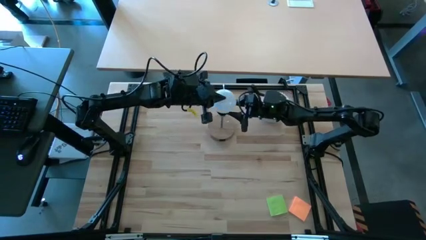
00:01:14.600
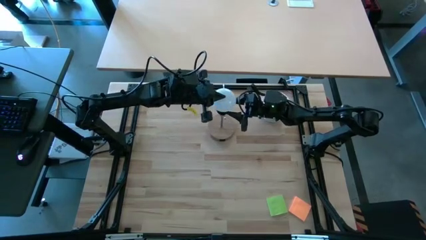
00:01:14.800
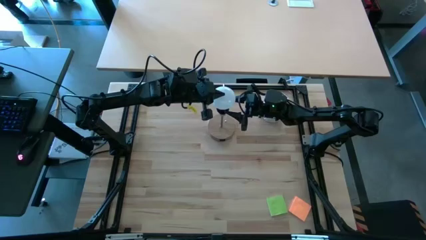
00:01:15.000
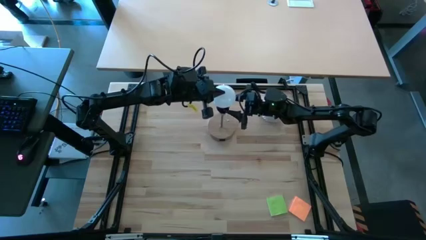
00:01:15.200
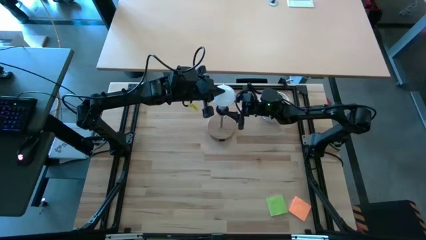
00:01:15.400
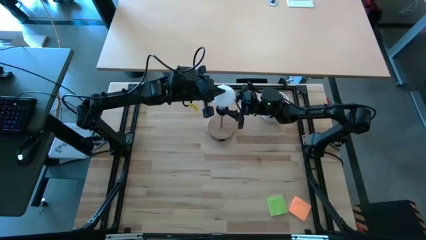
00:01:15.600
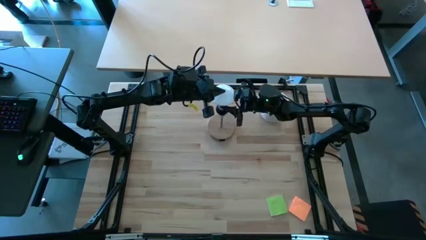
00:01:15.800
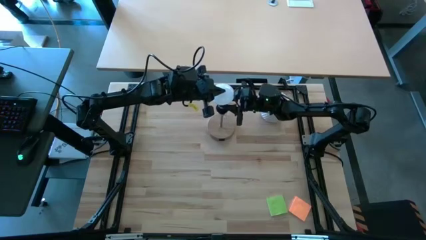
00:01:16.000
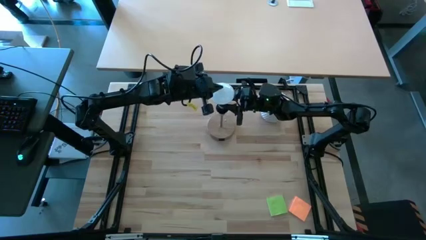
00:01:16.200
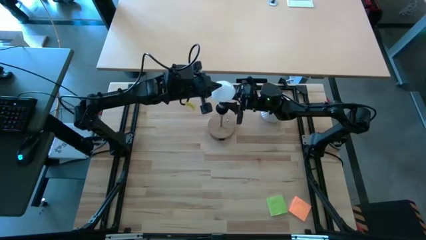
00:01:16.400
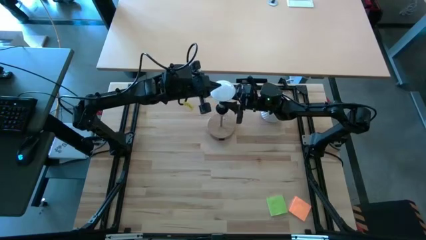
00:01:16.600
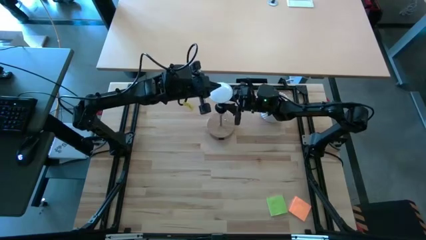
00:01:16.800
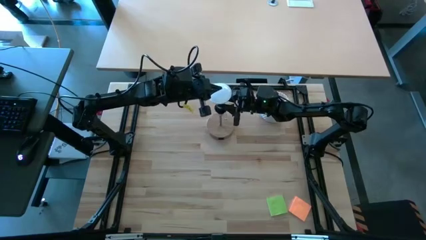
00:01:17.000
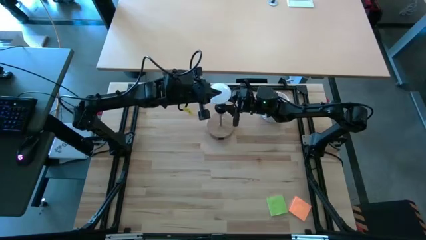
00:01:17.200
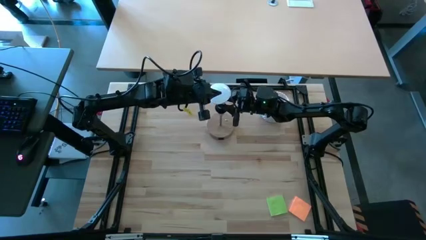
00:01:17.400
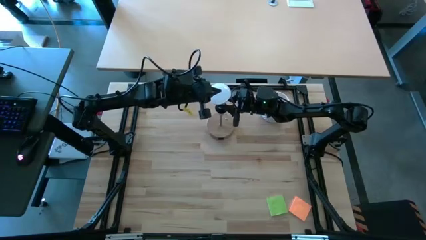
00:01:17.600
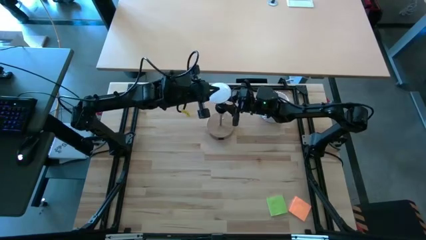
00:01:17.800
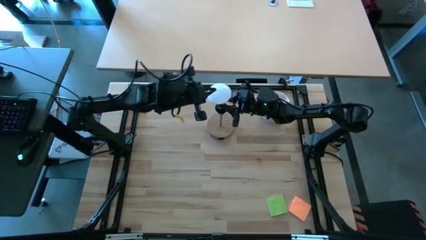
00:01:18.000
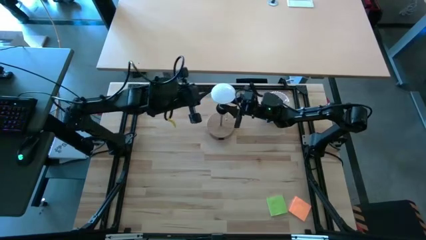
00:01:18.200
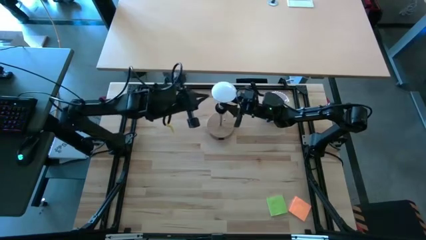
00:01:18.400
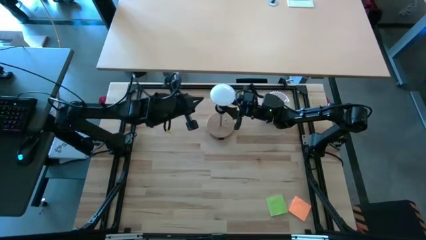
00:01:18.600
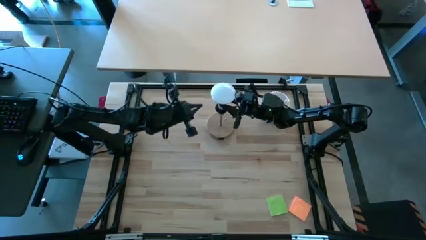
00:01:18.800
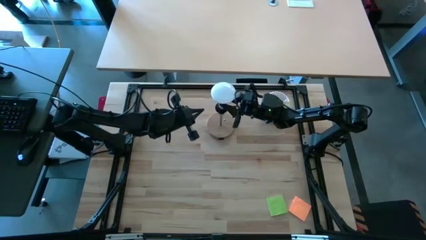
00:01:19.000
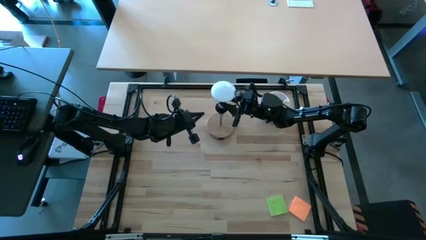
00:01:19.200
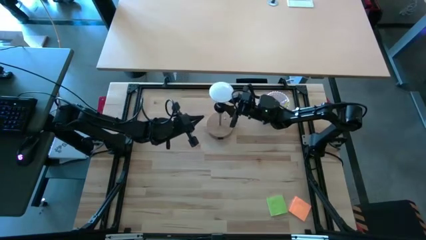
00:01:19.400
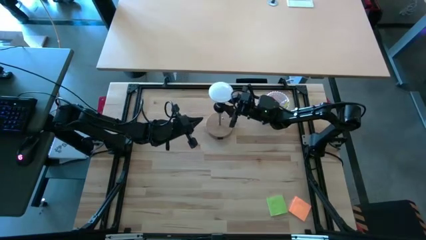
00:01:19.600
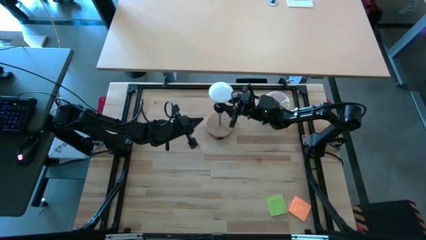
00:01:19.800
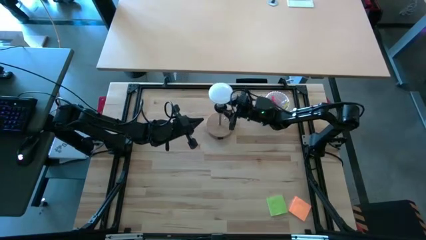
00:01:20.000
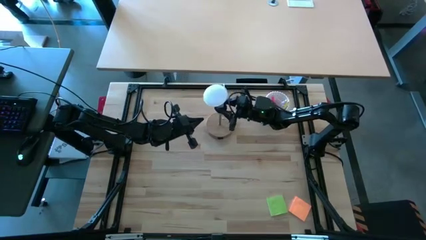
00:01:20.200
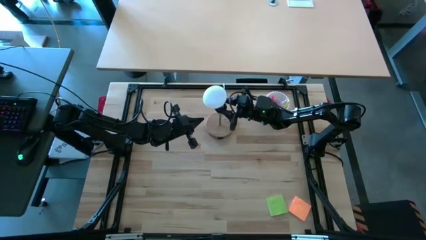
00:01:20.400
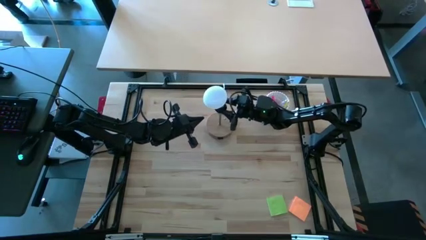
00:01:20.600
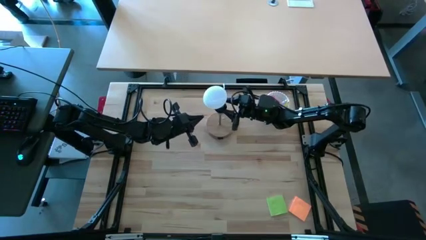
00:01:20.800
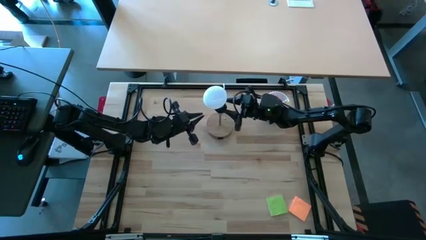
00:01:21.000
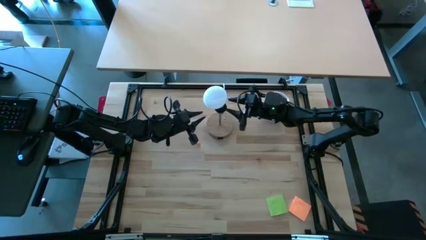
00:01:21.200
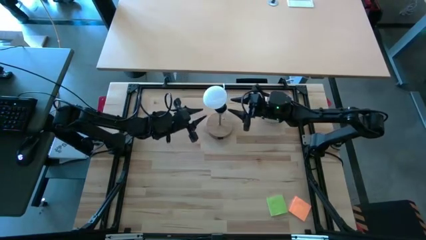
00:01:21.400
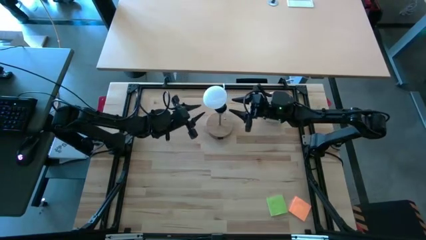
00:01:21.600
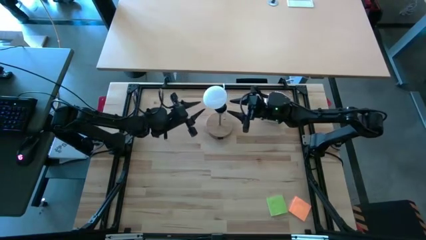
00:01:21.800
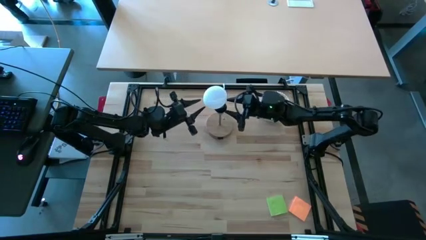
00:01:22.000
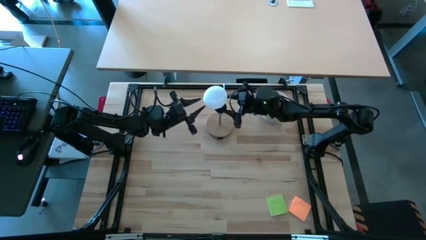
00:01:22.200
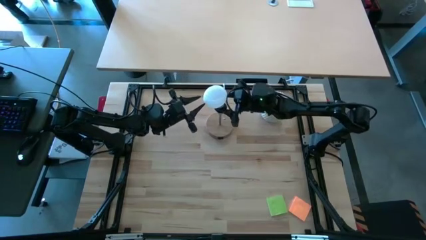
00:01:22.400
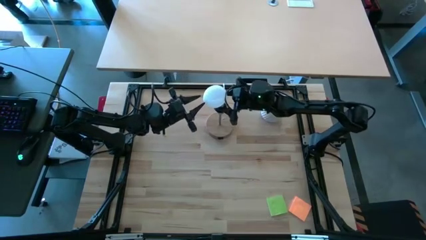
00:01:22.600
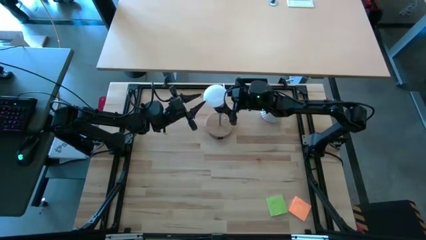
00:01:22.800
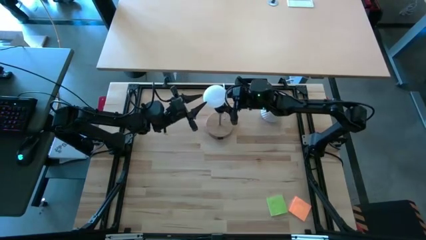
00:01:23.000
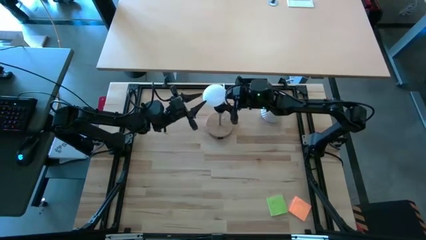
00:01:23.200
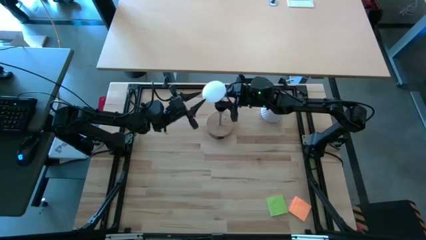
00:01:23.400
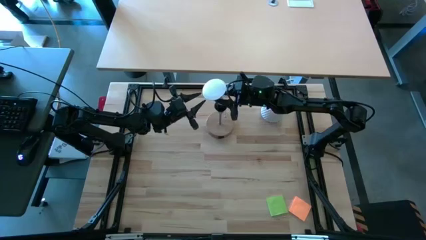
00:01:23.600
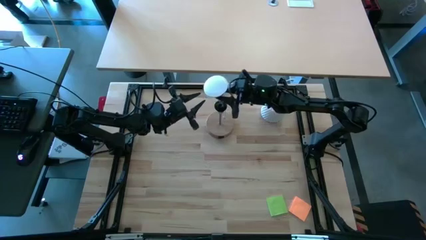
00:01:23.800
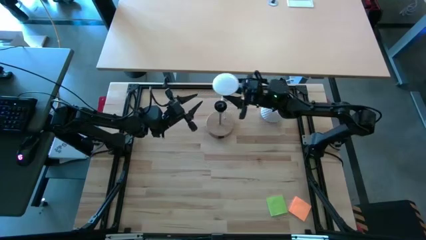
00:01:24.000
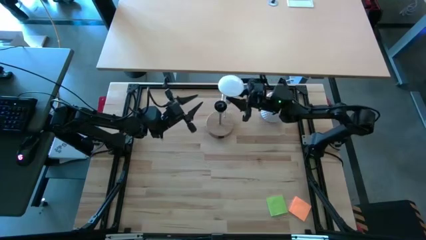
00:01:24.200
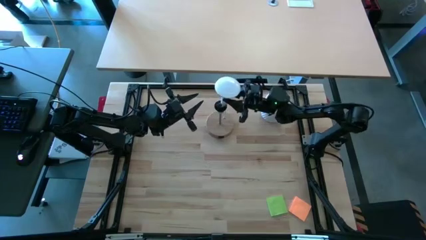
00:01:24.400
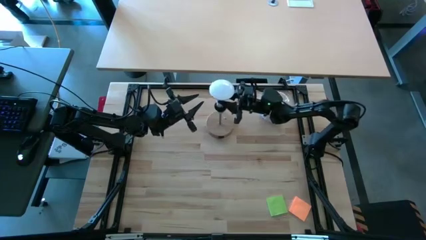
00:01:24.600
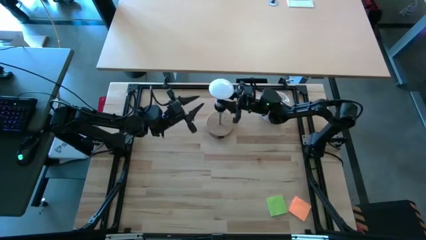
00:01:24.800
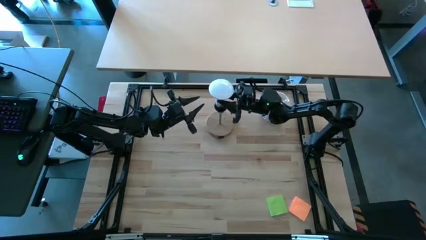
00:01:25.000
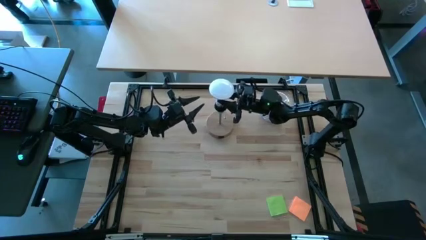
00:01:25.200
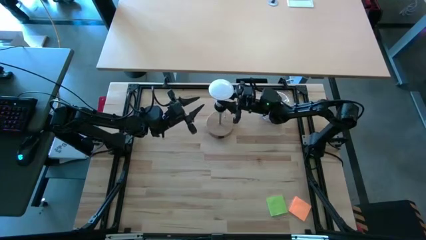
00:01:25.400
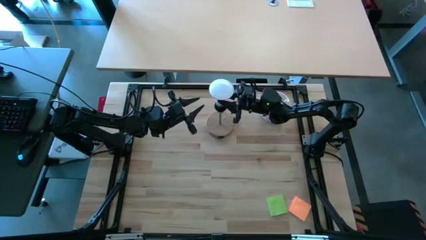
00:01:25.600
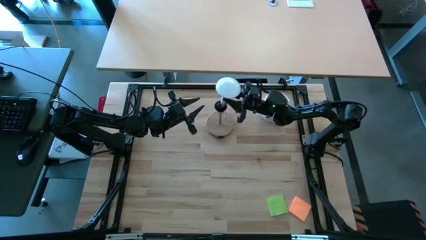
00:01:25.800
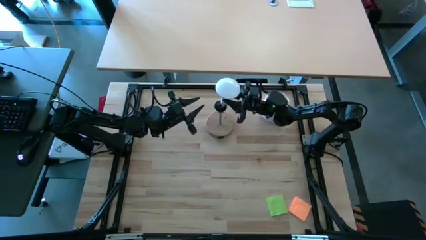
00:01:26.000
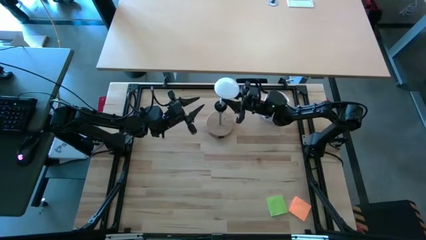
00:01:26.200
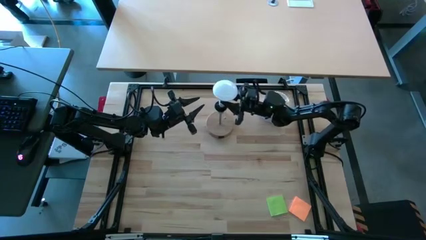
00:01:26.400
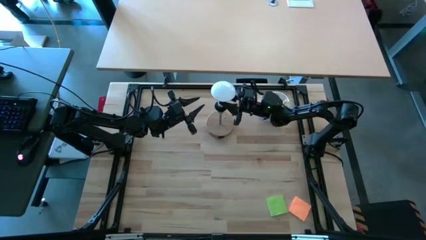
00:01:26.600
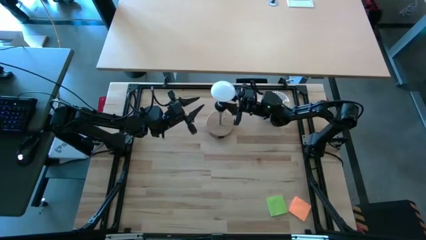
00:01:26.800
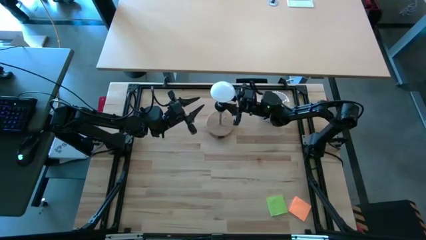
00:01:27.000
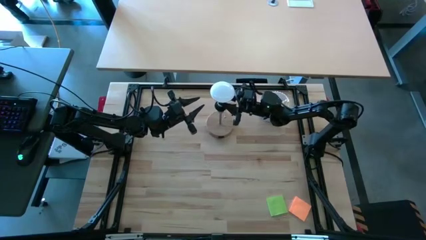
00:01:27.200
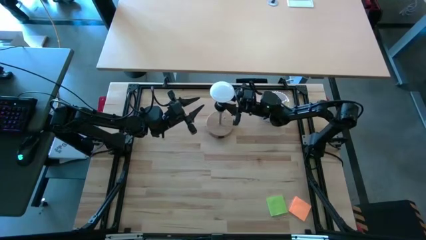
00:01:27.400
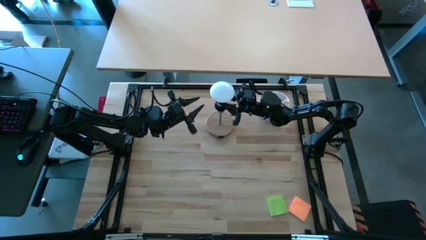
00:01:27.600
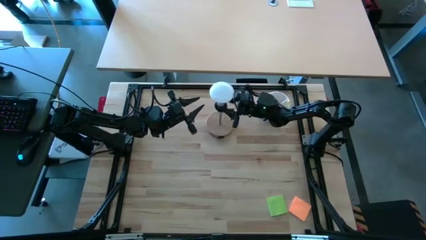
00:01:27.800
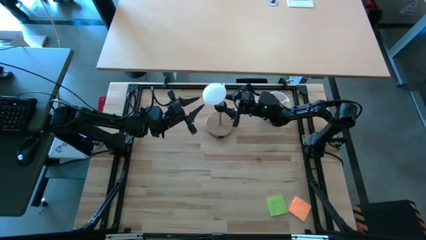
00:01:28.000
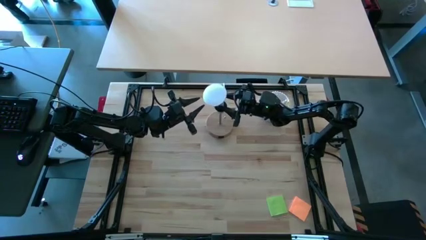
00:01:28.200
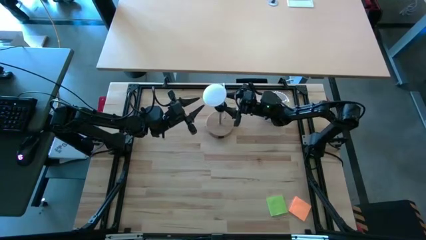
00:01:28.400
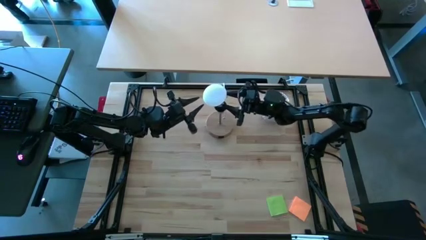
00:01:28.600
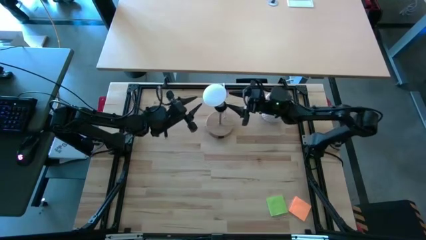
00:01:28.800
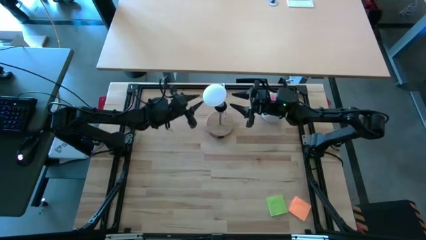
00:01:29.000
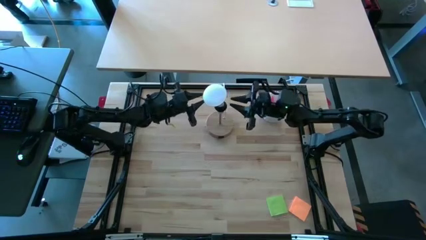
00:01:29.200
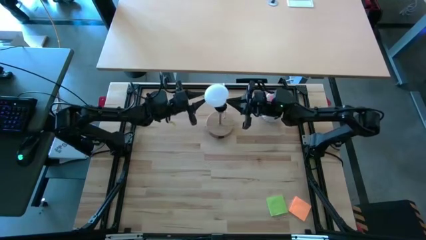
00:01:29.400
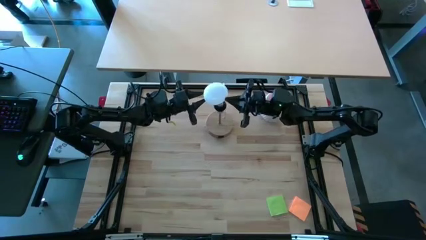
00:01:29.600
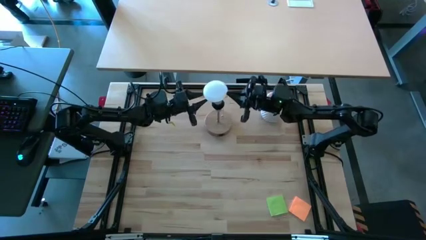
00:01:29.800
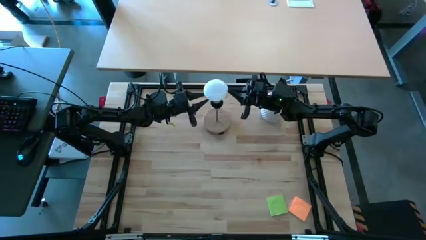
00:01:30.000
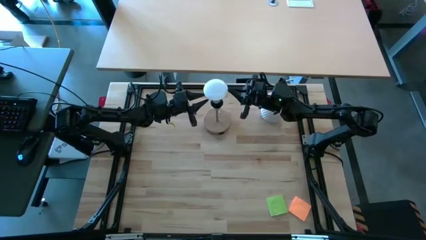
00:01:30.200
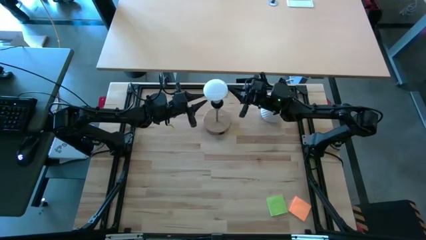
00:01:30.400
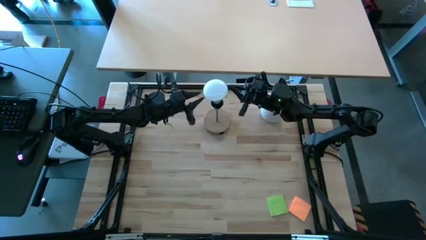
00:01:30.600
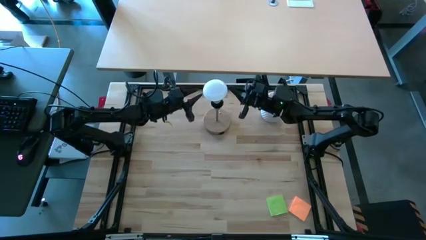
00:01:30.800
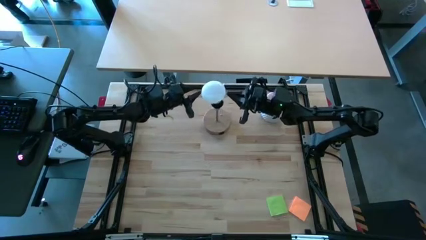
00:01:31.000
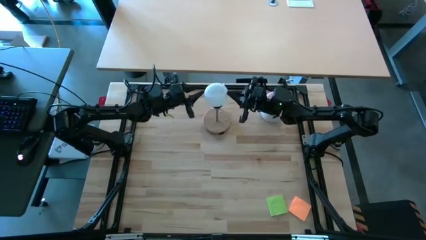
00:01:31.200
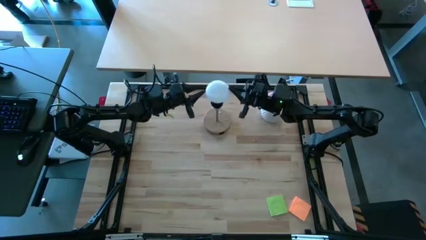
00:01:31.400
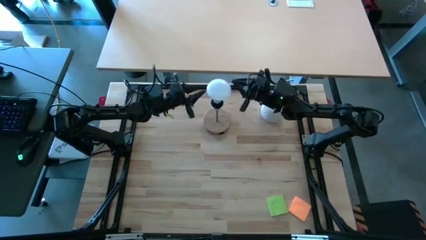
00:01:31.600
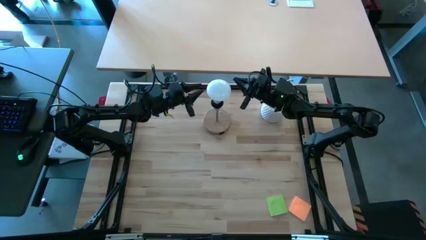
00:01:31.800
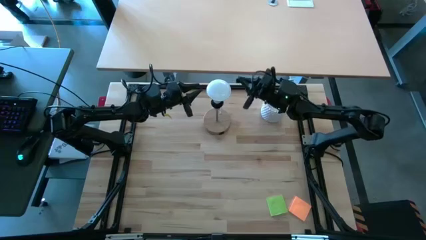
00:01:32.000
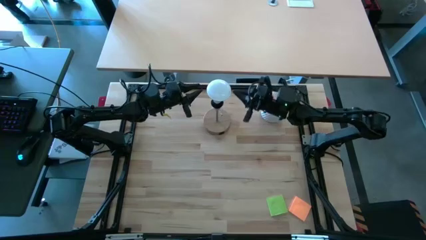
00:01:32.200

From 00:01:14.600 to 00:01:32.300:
Task: Screw lightbulb
Insert the lightbulb into the lamp
